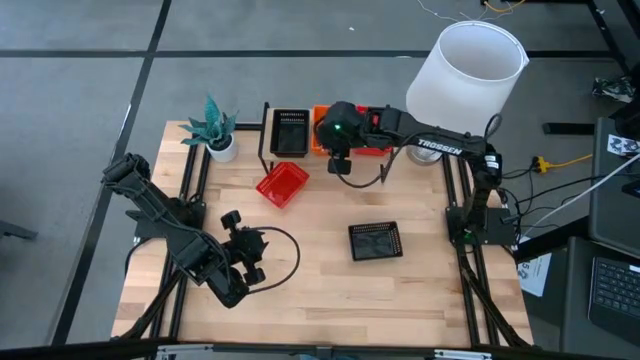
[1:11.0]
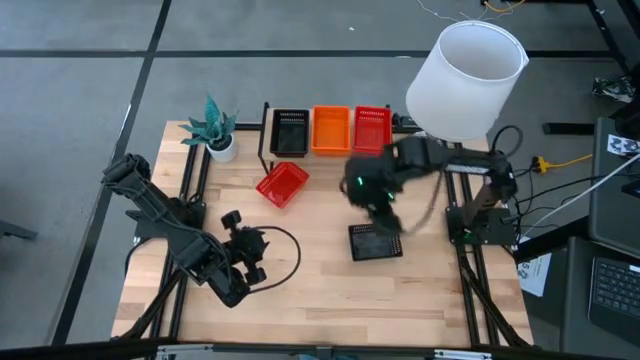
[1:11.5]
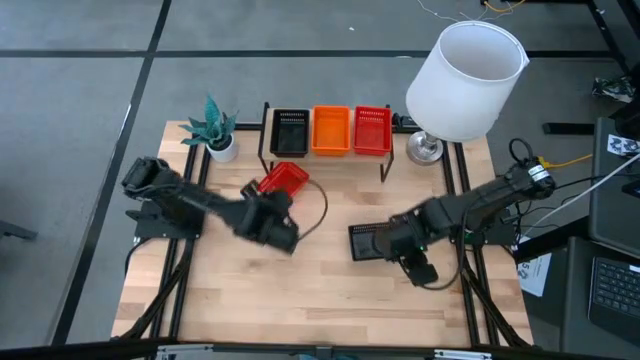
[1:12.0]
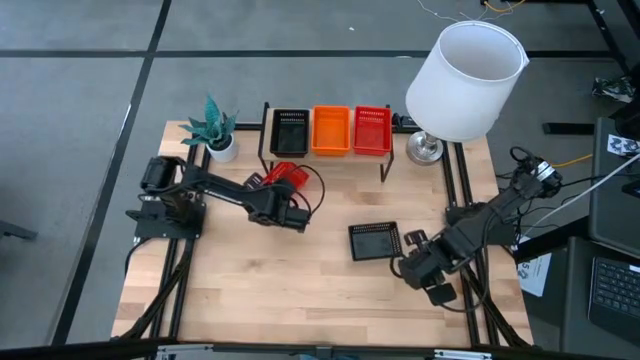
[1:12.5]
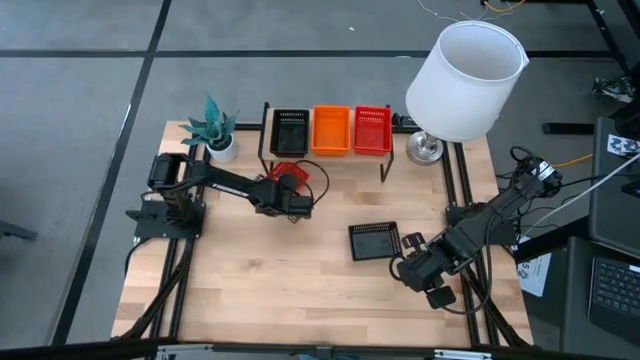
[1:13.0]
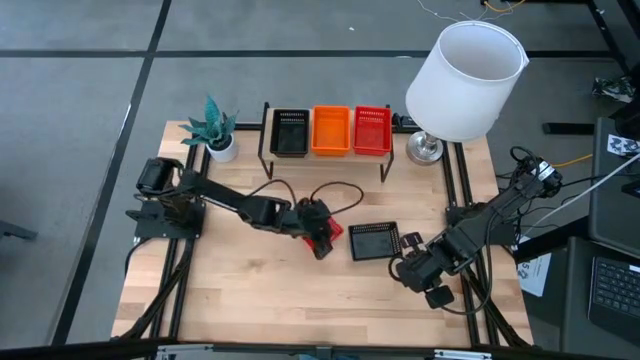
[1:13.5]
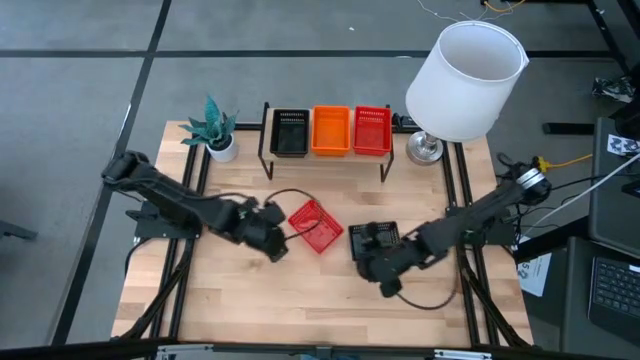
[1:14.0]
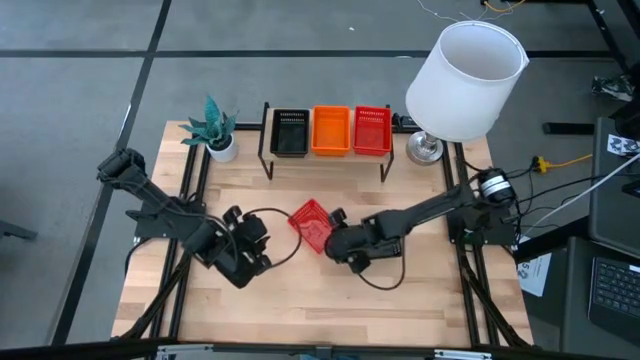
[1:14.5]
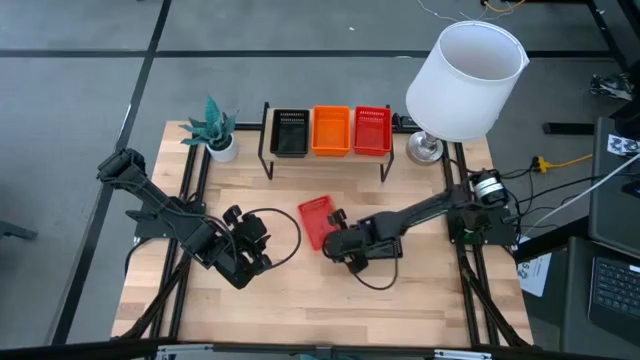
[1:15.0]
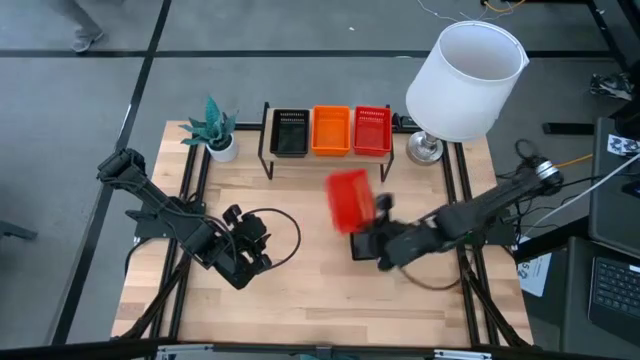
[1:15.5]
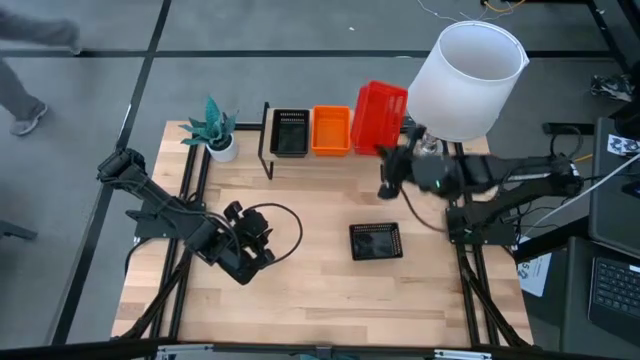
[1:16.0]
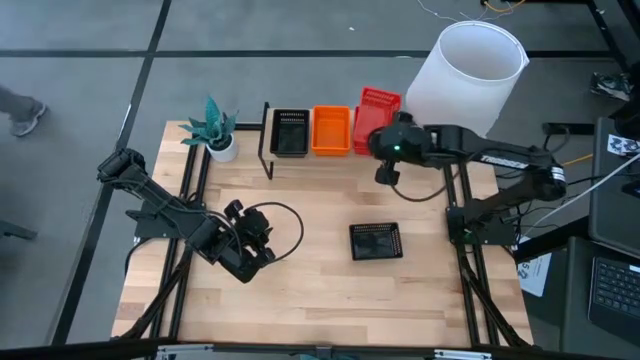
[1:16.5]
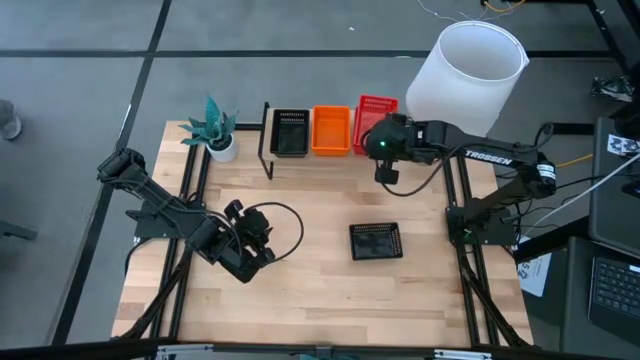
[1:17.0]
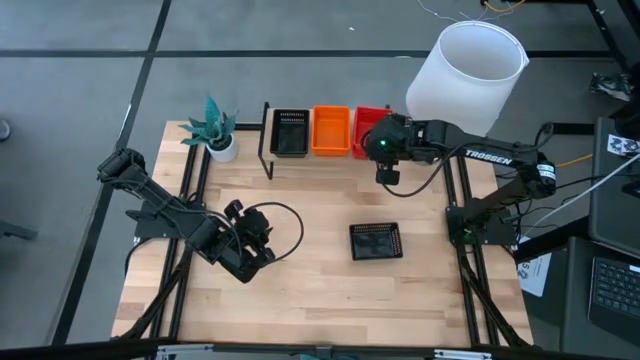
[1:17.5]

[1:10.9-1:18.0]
Task: Stack baskets on shelf by color
Stack the red bin on top of the red bin on the shelf

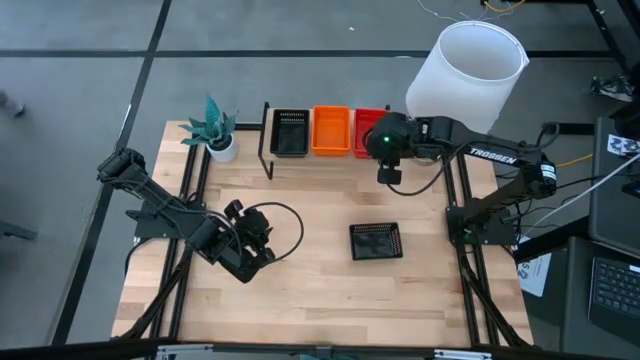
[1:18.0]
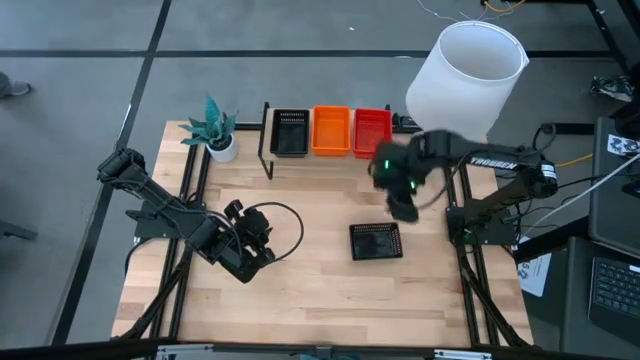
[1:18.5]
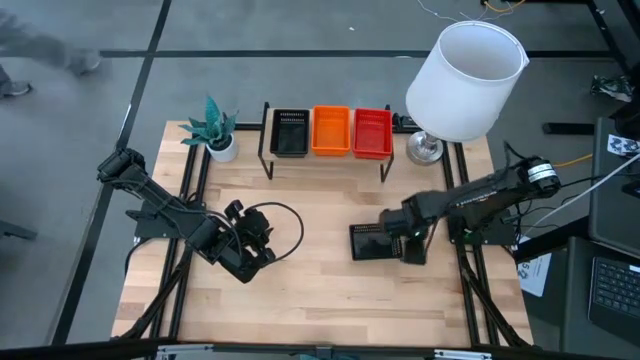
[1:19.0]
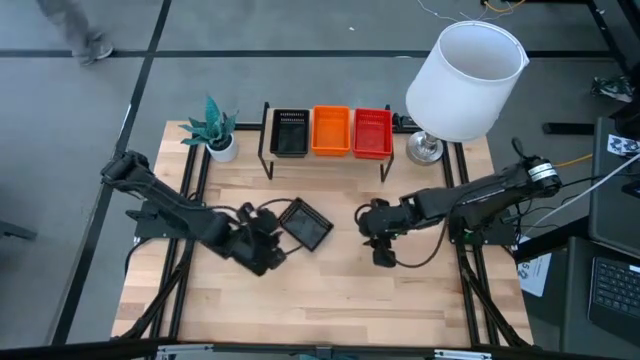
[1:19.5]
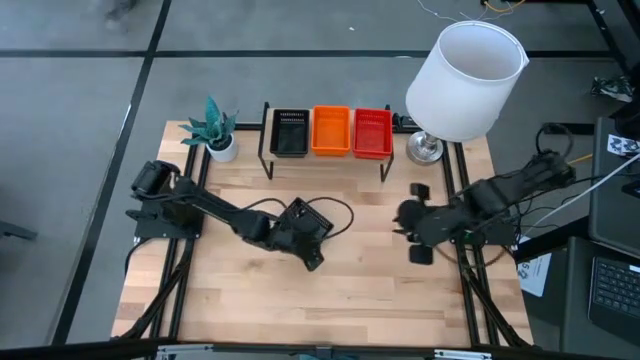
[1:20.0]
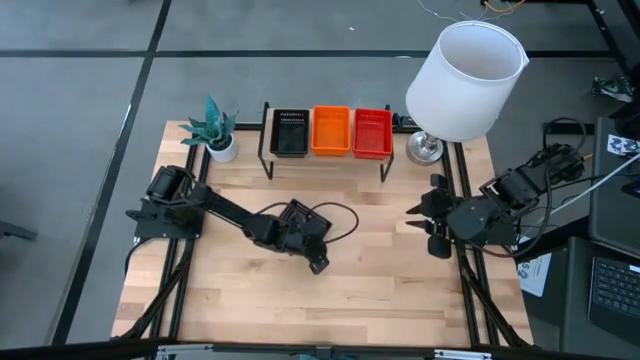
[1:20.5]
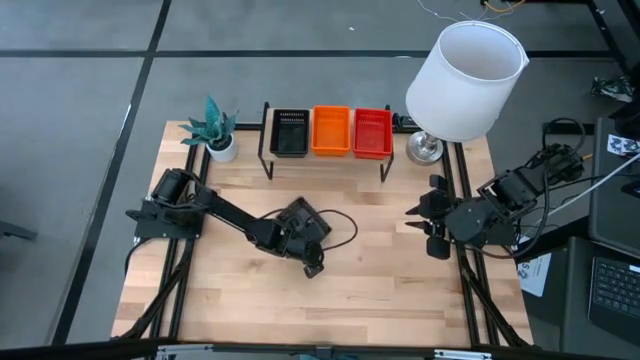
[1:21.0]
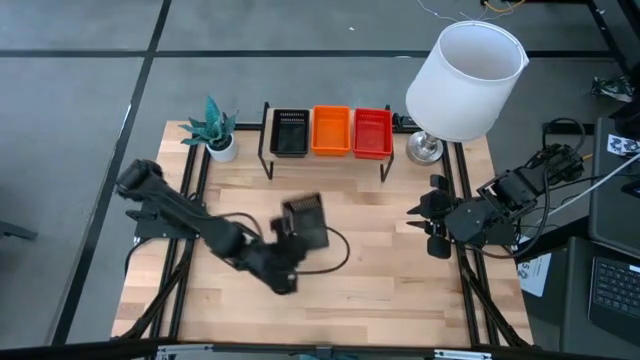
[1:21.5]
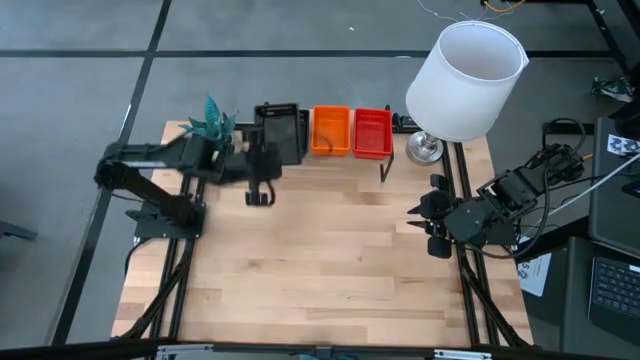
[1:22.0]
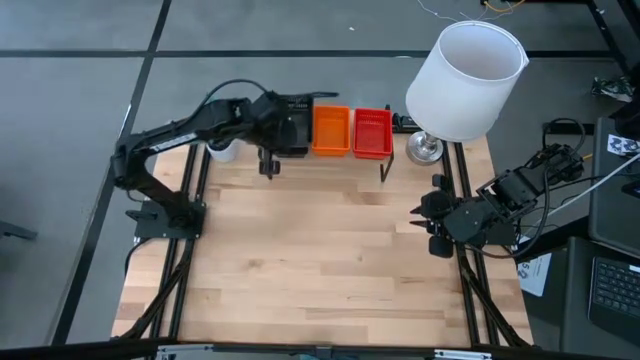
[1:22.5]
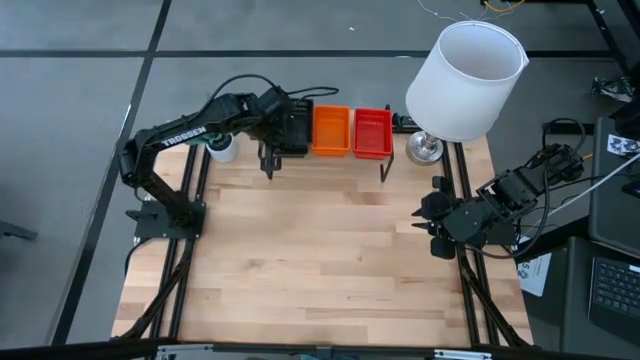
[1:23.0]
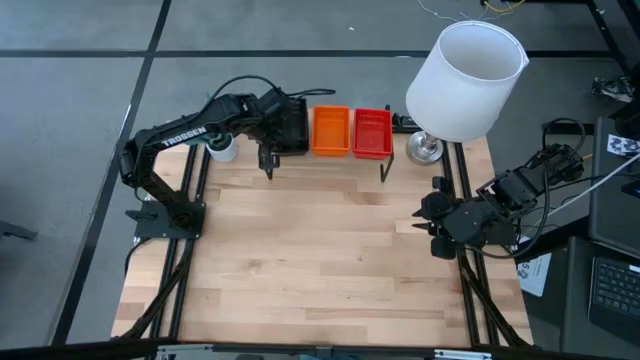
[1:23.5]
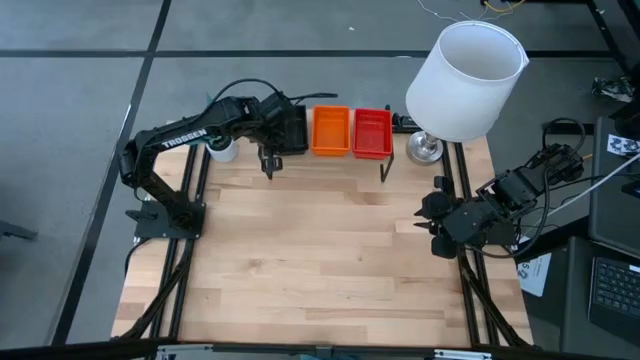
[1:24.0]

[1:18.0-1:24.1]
Stack the black bin on top of the black bin on the shelf

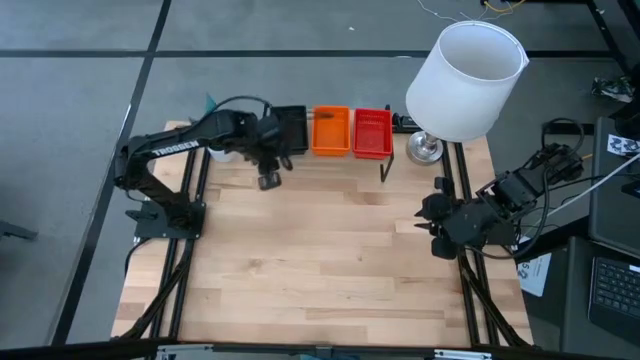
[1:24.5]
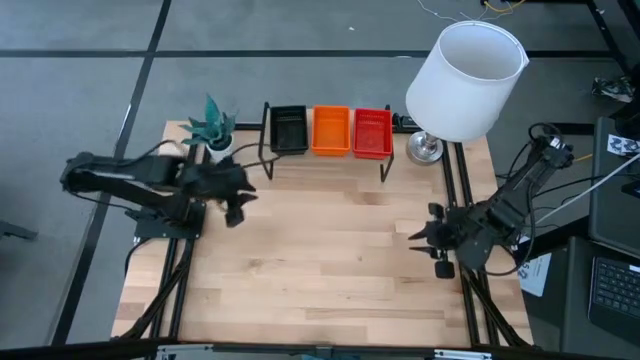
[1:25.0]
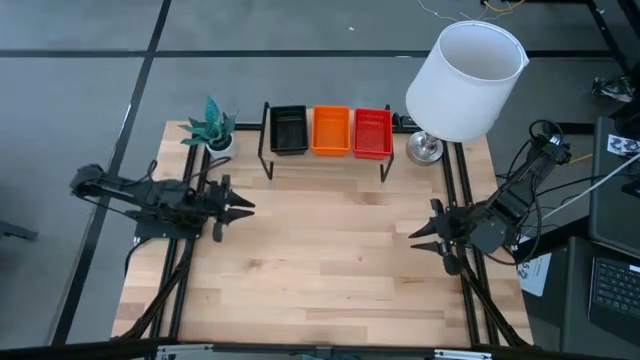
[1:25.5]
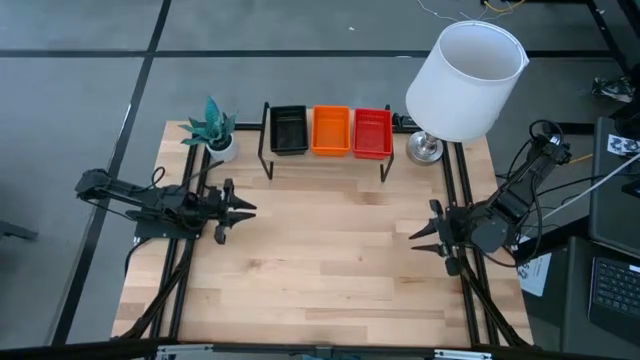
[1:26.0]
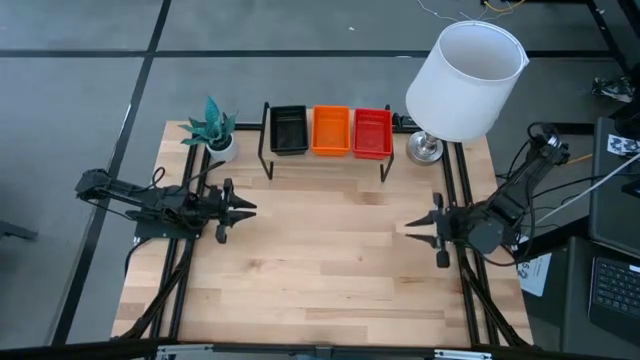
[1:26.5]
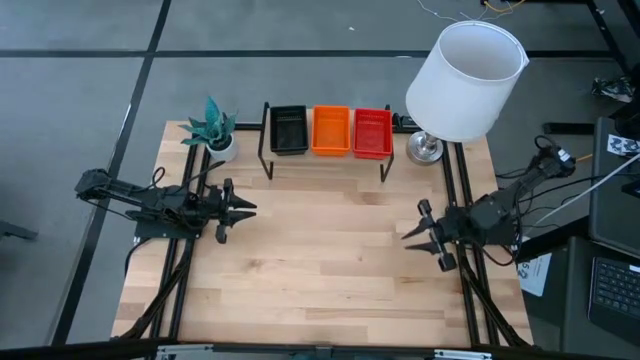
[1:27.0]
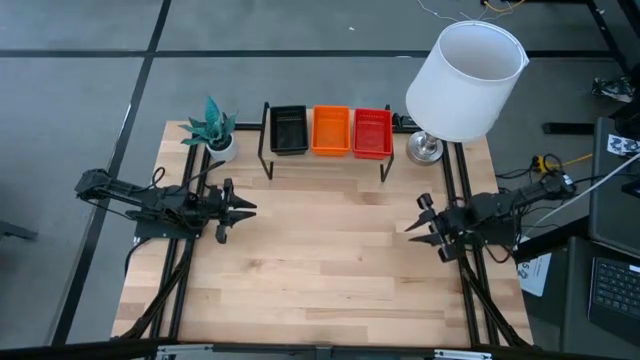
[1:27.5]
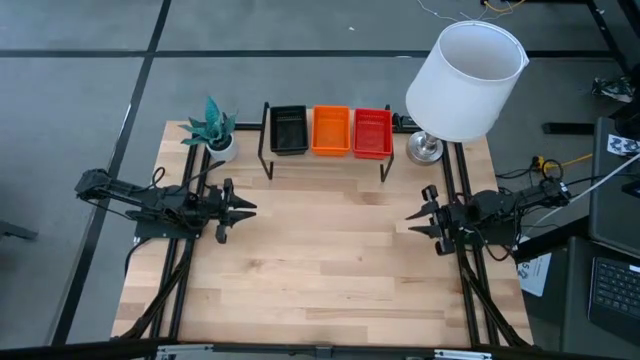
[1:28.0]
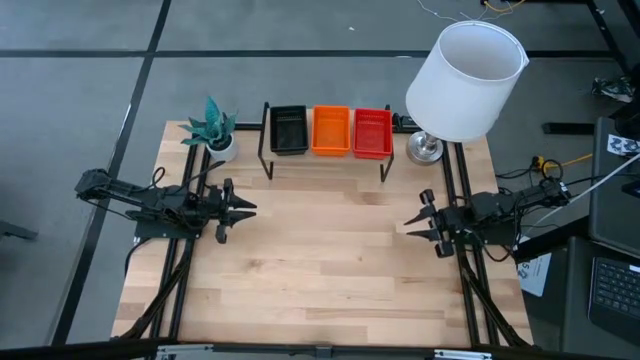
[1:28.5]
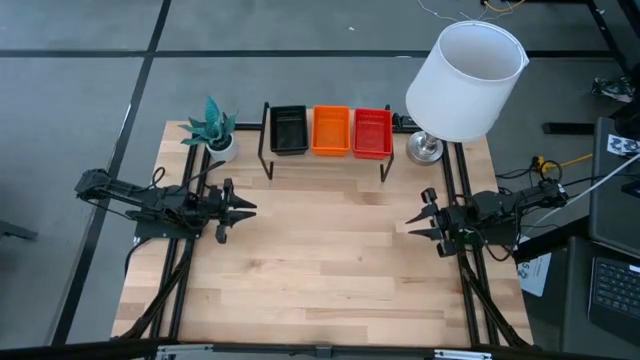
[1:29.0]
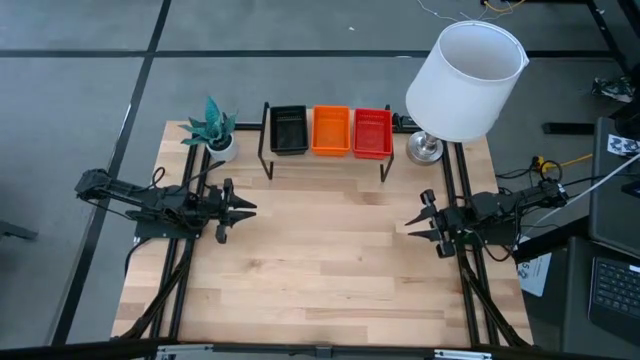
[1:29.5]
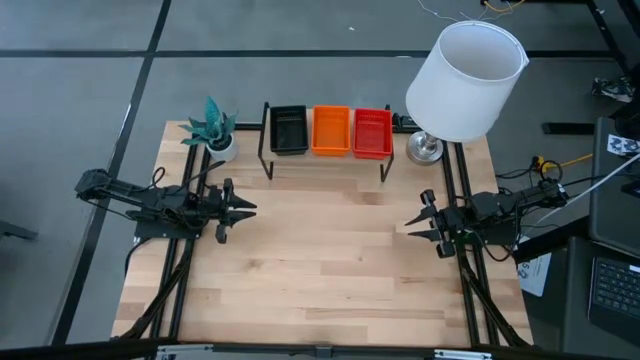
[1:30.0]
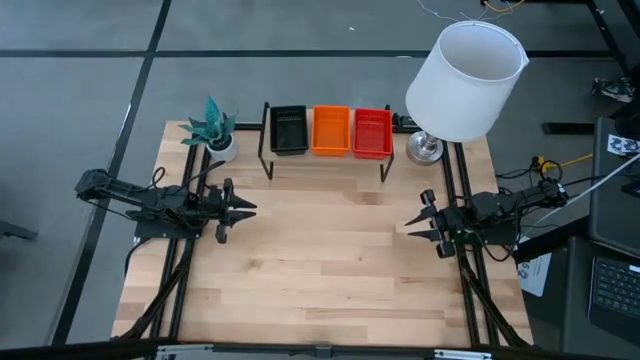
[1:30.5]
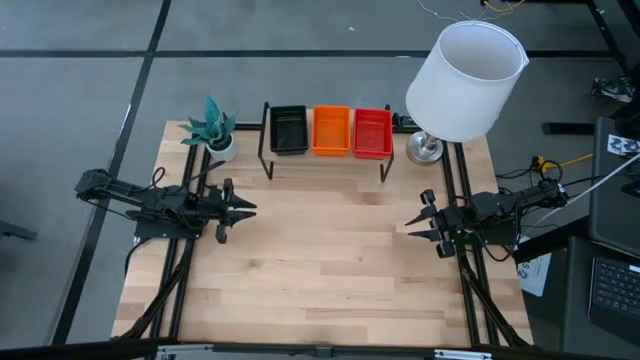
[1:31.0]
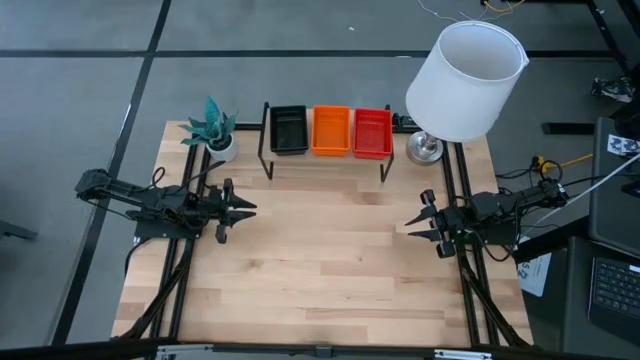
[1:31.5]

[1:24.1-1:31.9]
Return to Home Position
